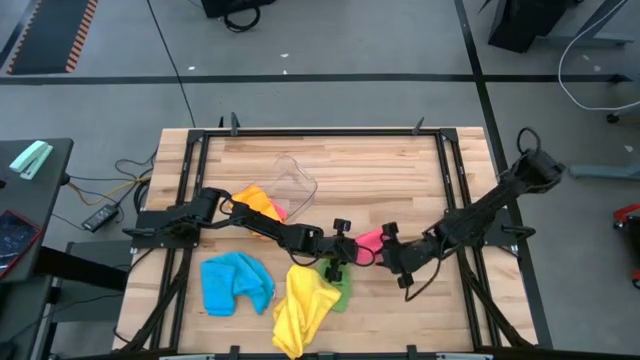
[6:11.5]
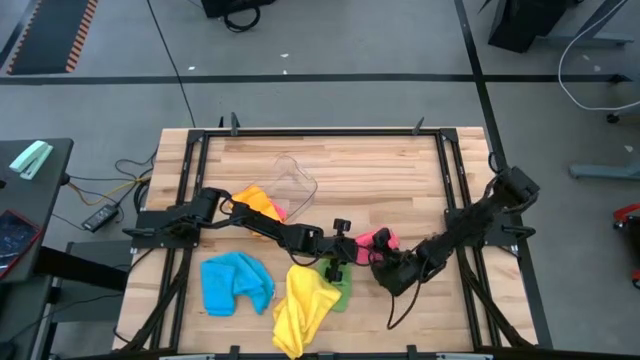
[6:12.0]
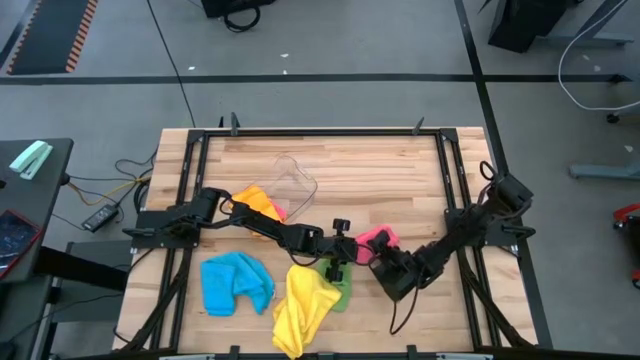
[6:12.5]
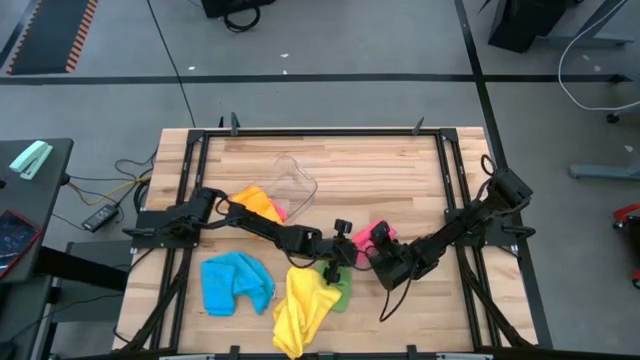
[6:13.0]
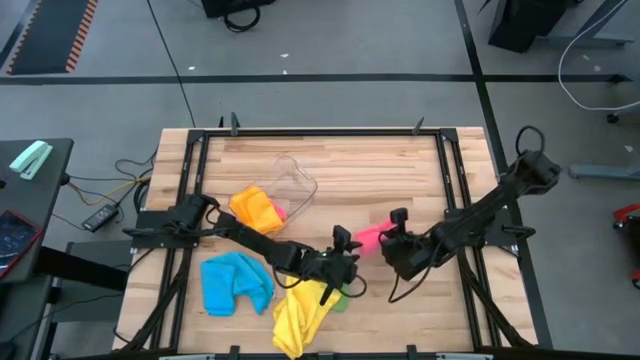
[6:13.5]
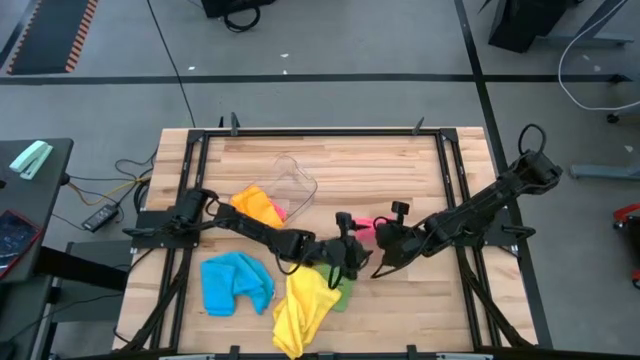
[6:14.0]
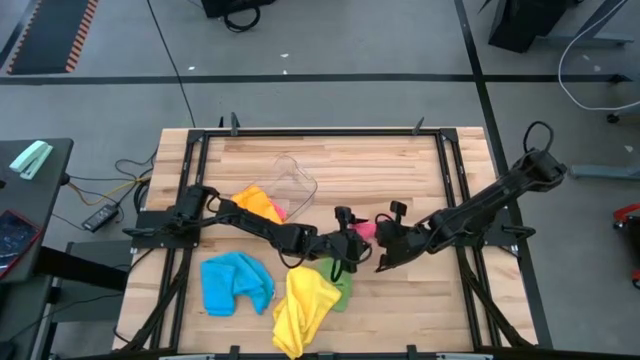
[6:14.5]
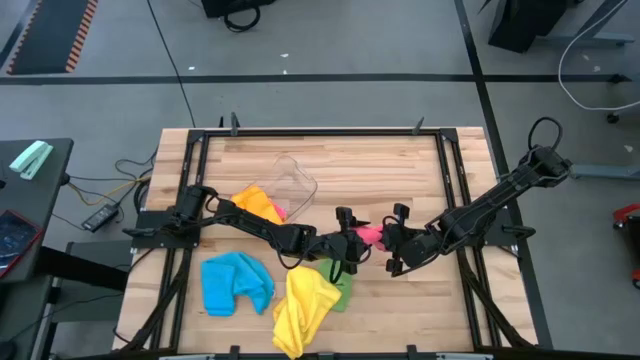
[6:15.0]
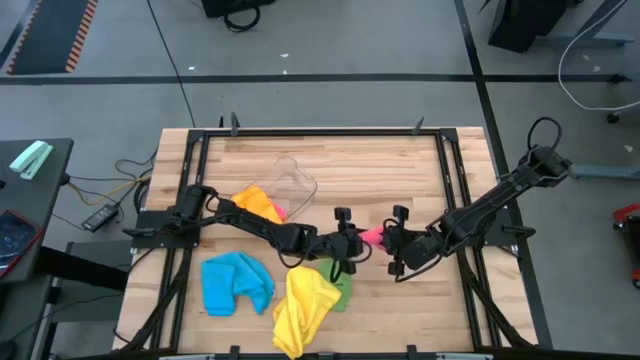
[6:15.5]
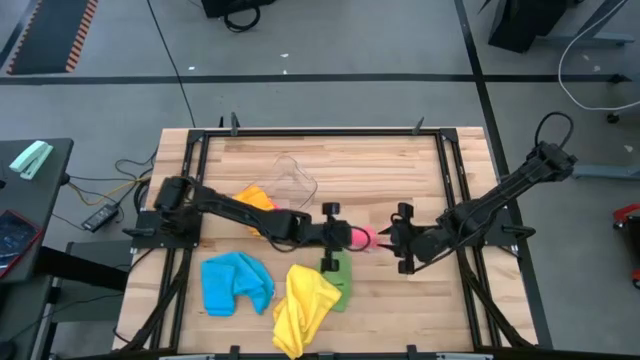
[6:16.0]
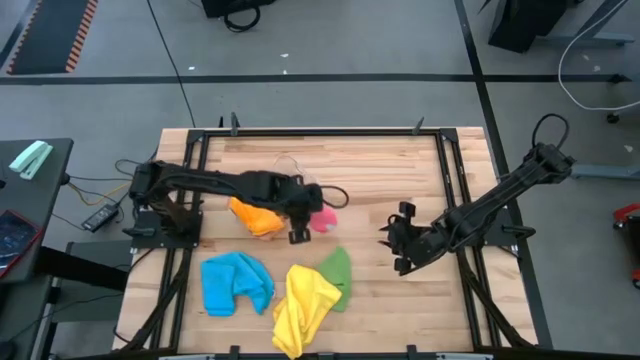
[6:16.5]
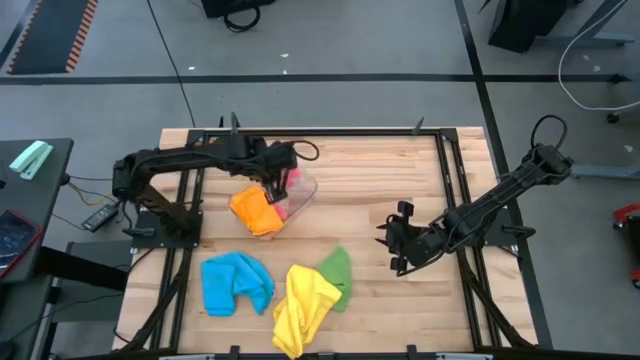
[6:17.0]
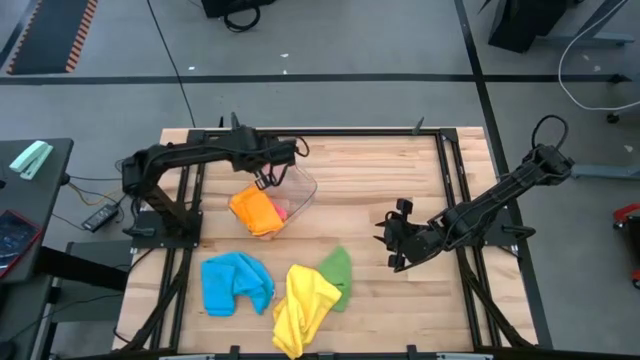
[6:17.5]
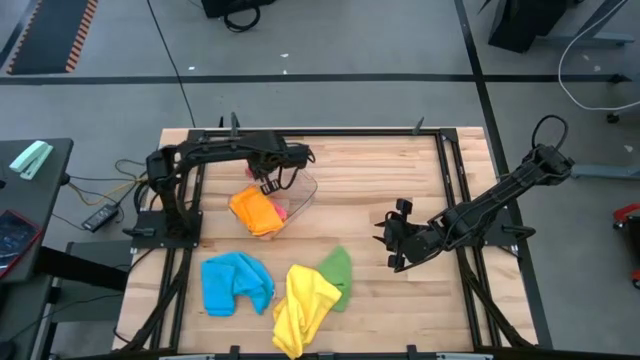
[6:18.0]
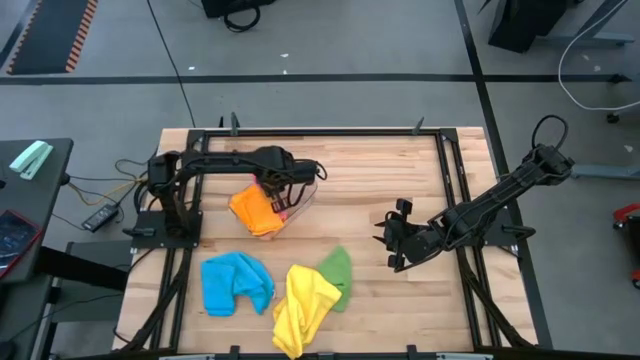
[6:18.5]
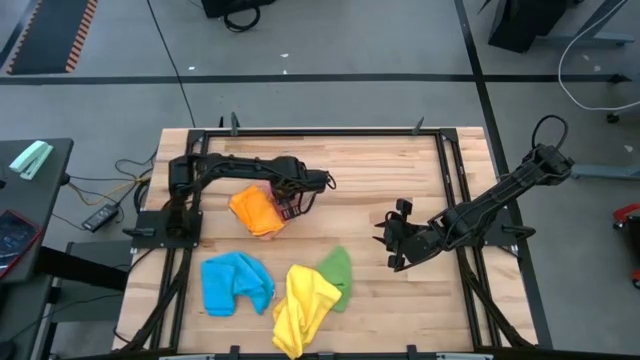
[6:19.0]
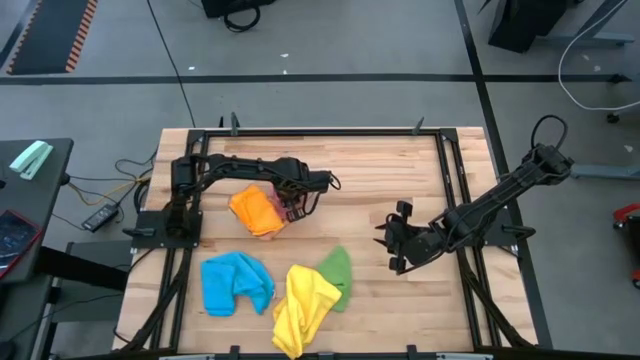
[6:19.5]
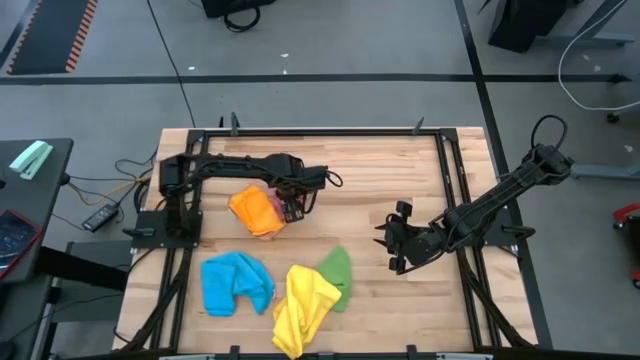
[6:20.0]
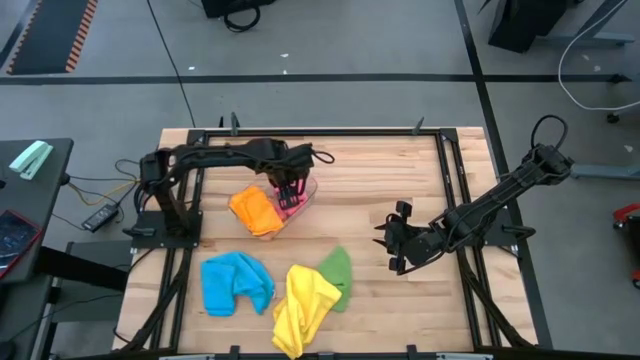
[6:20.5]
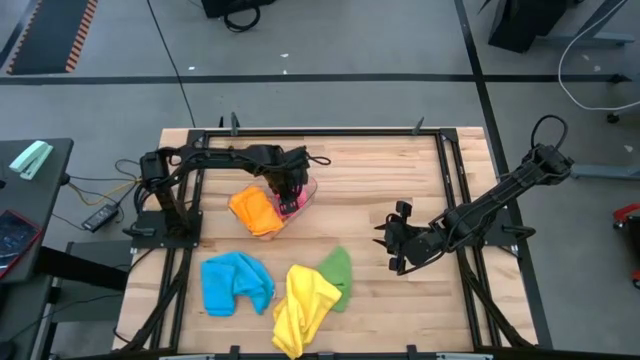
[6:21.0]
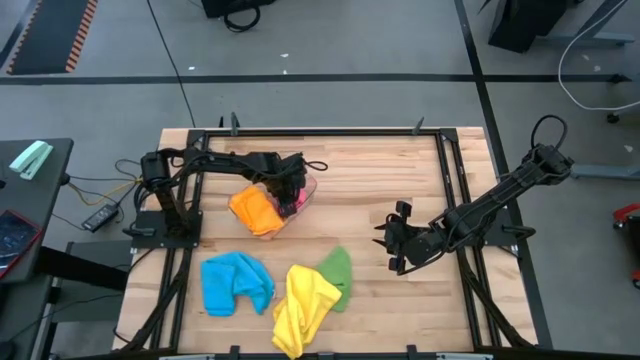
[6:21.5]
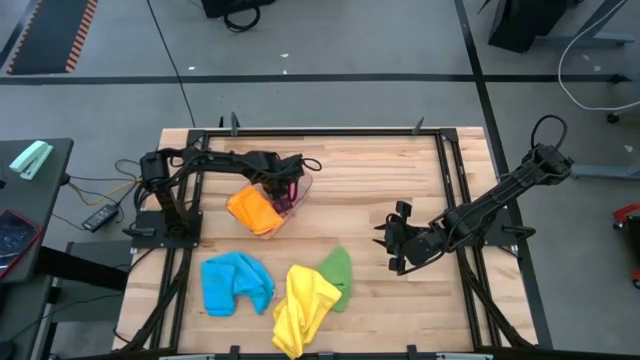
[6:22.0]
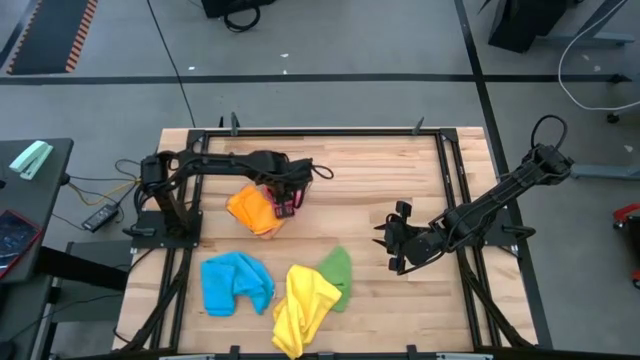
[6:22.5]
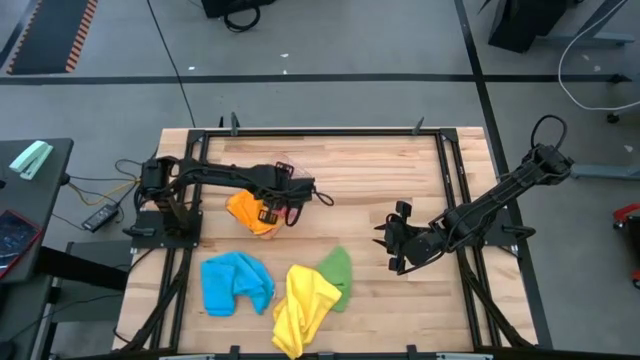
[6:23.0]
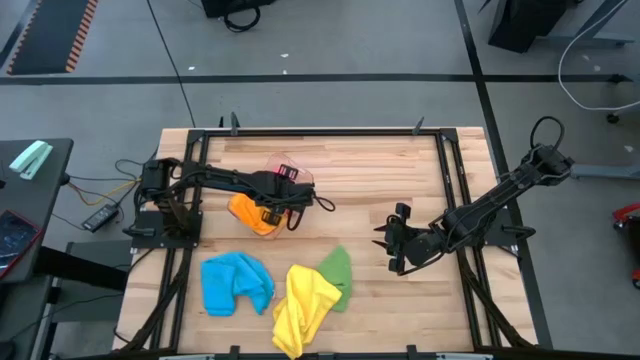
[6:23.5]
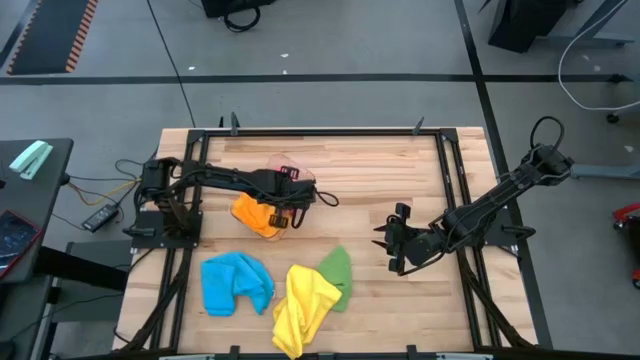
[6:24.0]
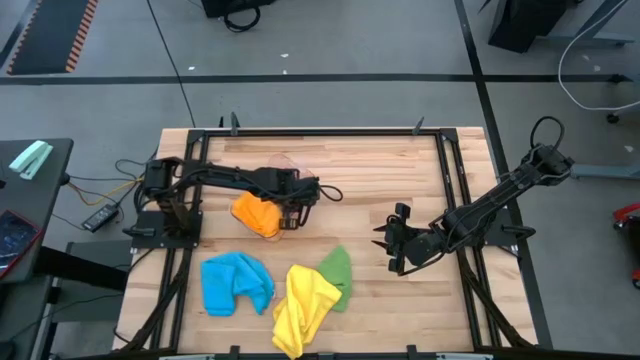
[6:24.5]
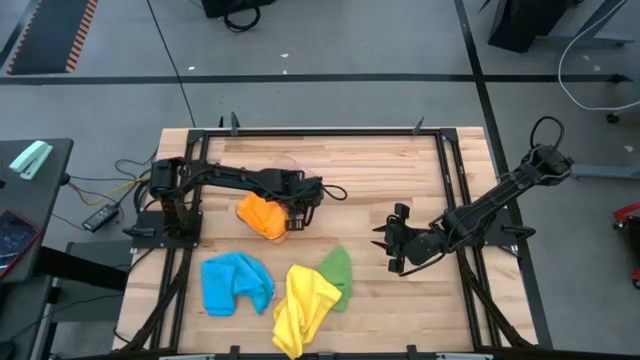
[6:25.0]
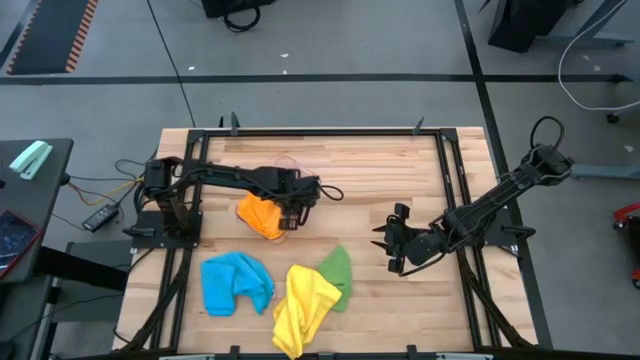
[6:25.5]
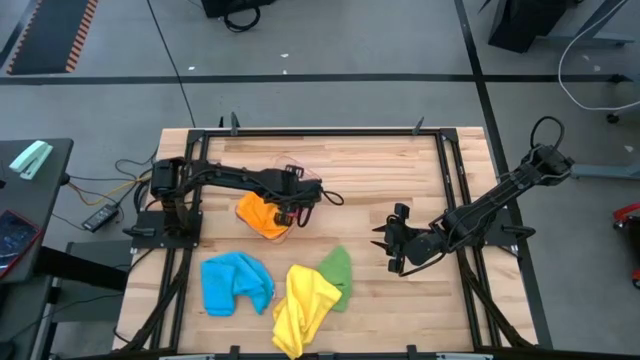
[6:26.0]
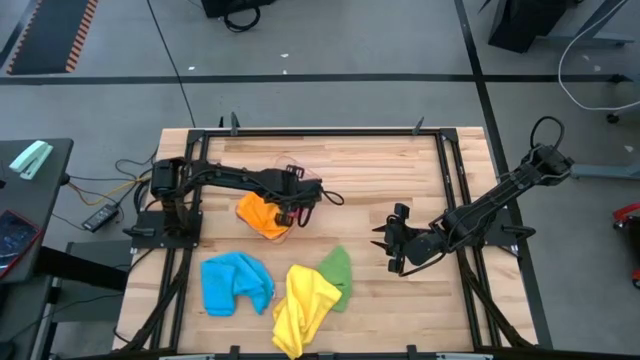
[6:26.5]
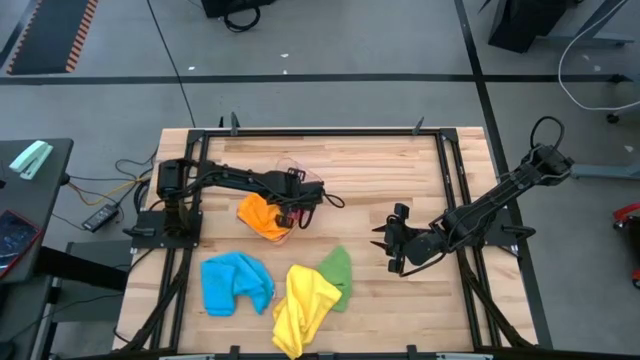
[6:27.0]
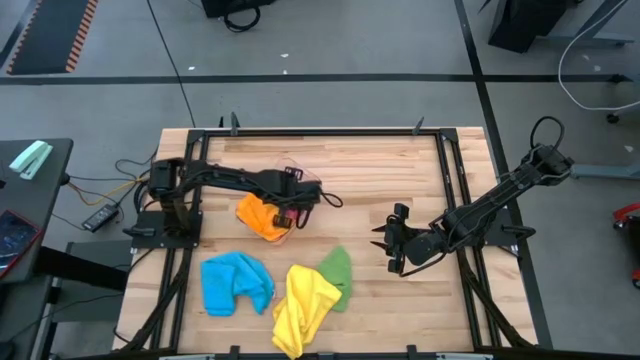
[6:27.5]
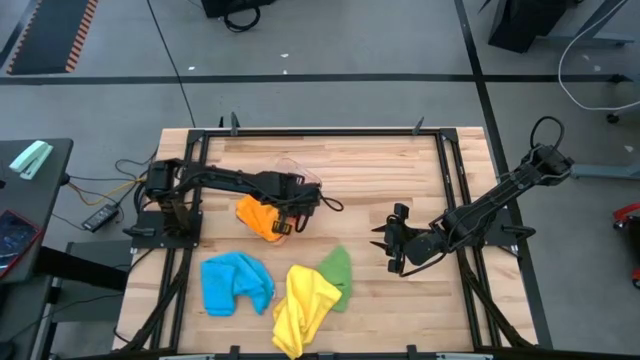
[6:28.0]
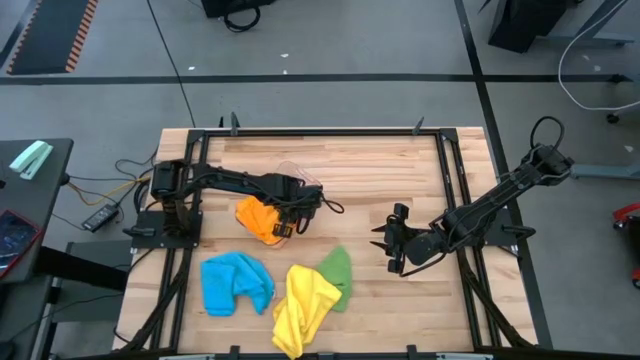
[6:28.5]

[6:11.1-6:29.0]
Task: Fold microfiber towels
Put the folded pink microfiber towel into the transparent bin
